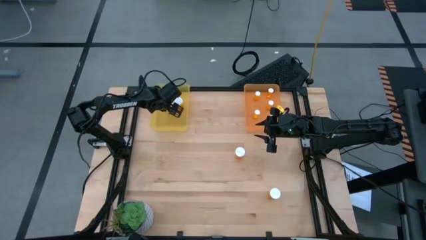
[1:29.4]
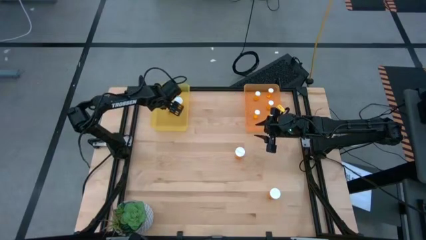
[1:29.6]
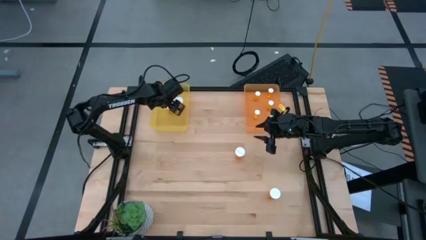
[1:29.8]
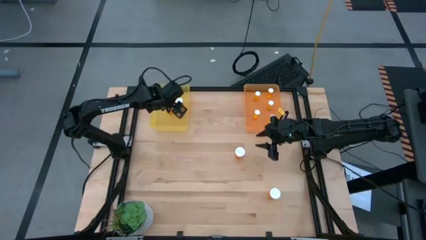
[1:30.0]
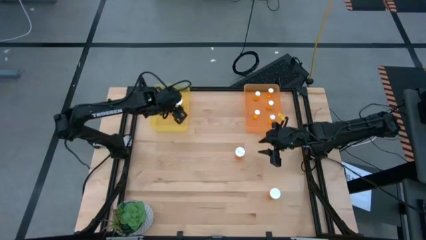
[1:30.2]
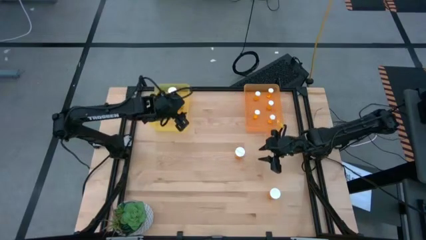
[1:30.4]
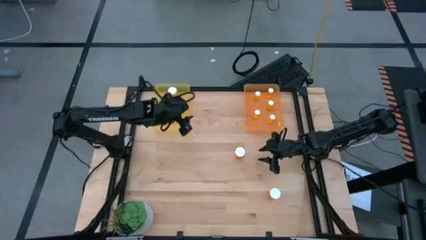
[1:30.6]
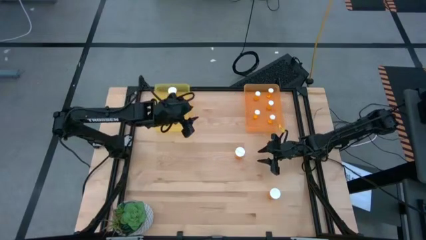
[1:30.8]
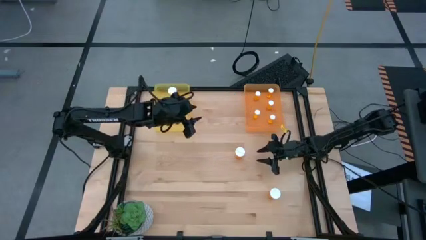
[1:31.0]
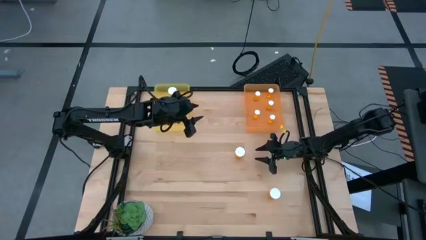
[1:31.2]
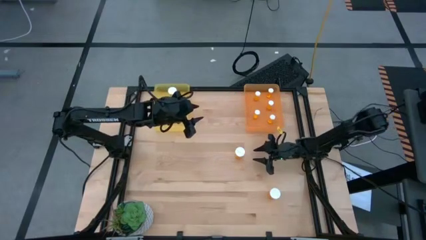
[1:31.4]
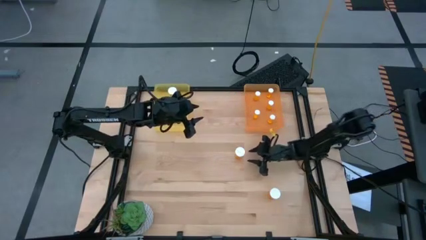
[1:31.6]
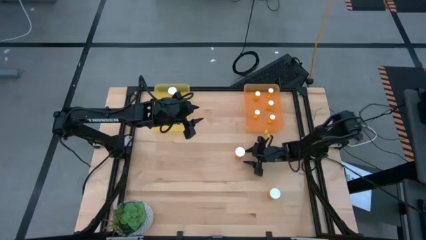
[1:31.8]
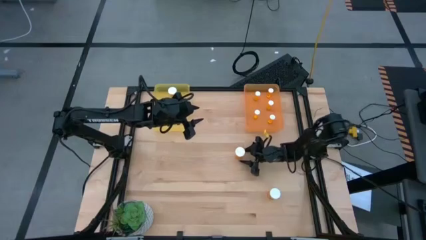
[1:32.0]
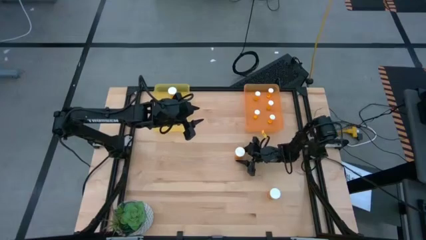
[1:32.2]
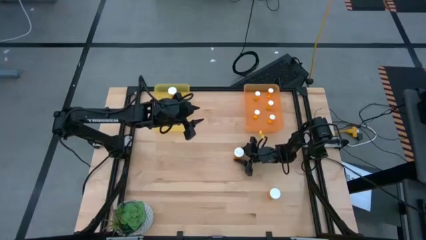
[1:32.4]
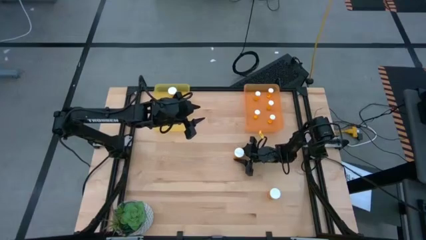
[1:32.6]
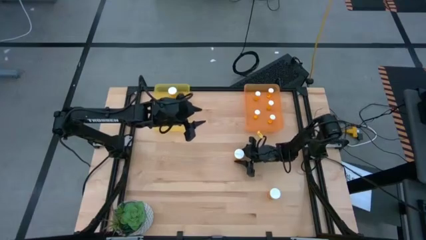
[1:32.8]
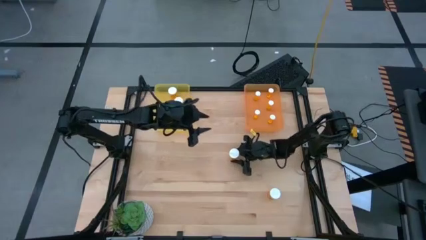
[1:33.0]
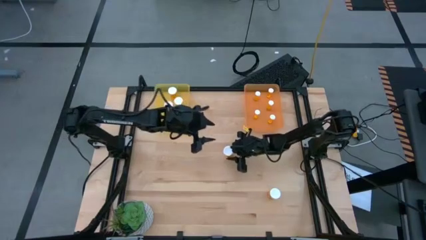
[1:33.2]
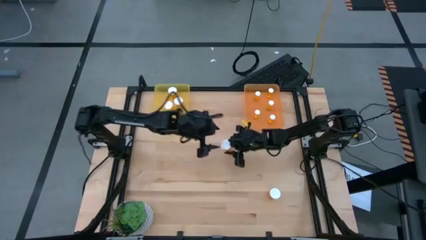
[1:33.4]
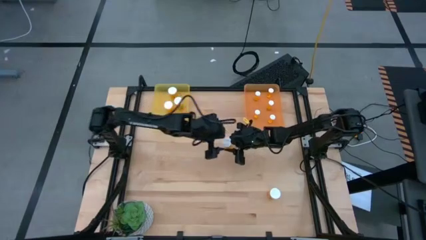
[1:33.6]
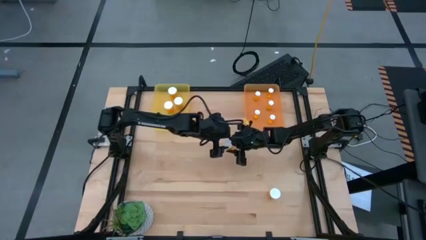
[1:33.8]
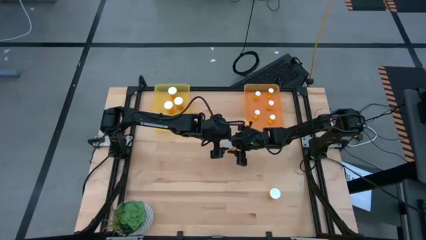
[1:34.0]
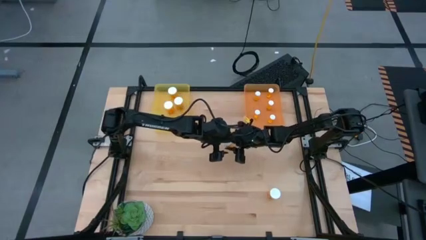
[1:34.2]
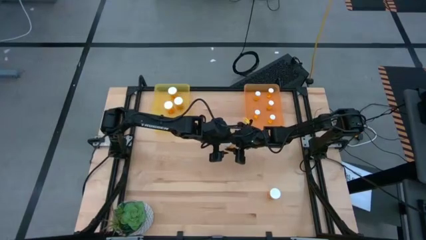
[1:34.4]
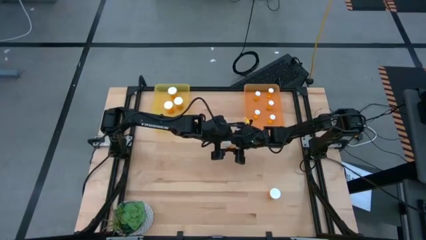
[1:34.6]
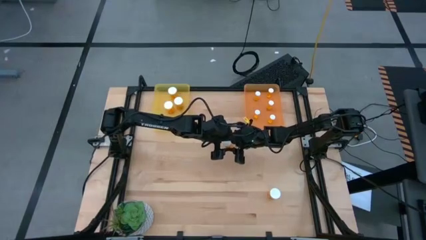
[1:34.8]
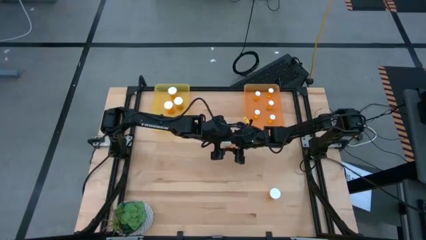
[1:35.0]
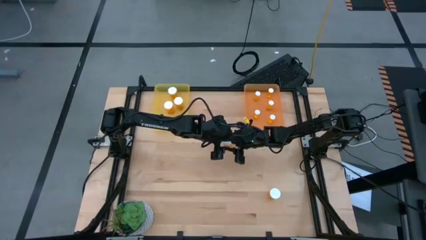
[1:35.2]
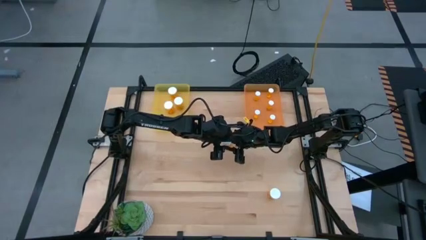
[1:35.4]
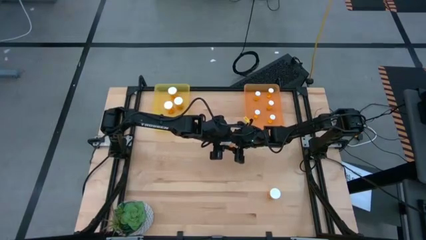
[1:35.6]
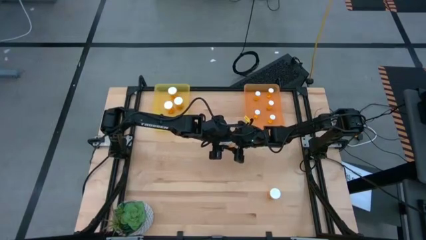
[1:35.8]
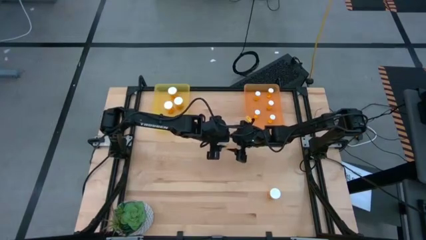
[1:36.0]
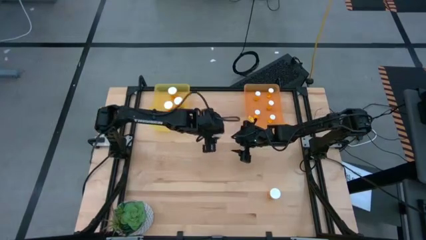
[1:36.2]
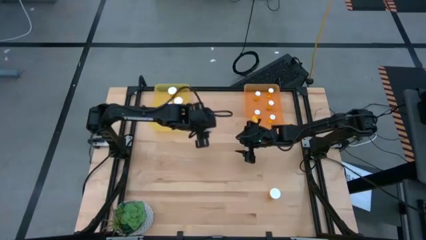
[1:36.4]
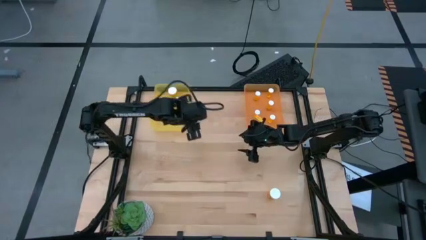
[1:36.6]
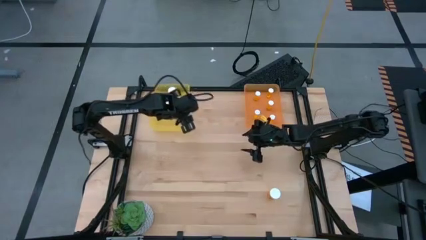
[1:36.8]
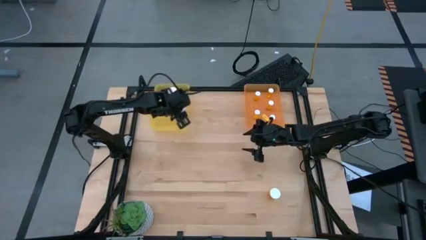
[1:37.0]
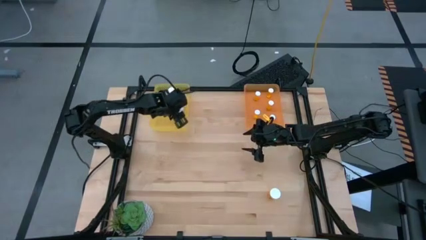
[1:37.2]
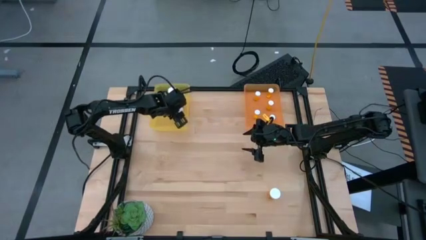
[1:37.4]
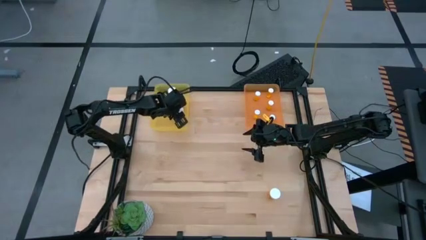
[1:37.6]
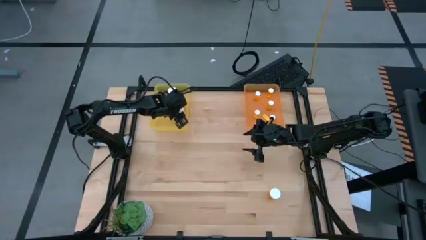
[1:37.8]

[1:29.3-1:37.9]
Task: Pick and place medicine bottles into bin by pill shape (circle, oval)
Put the large orange pill bottle into the yellow bin

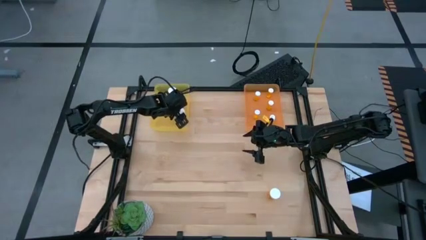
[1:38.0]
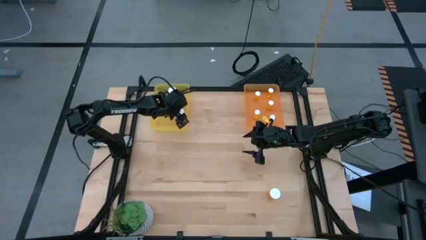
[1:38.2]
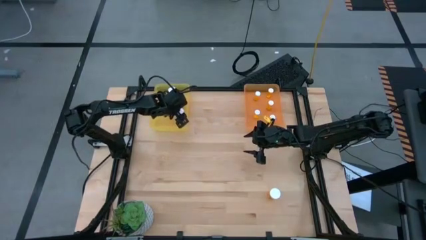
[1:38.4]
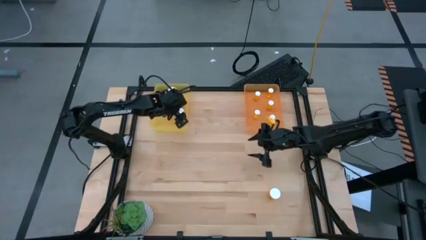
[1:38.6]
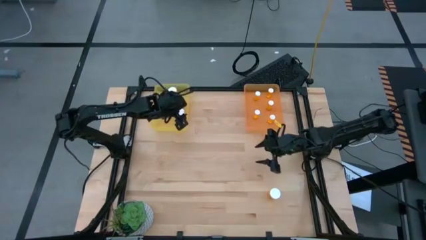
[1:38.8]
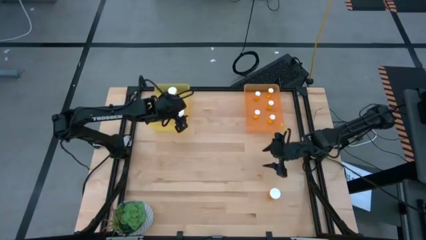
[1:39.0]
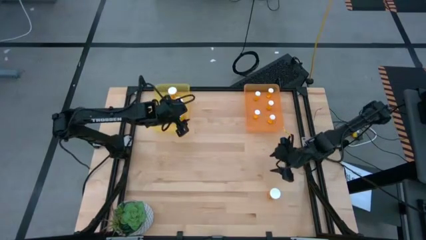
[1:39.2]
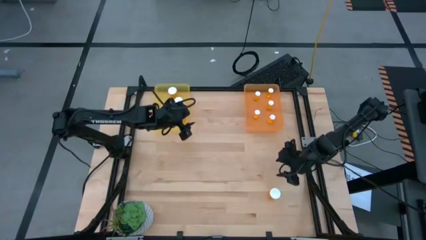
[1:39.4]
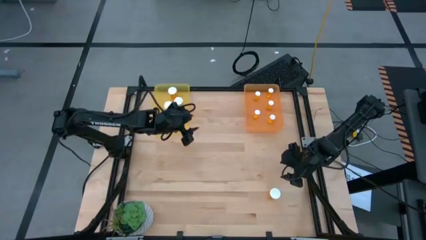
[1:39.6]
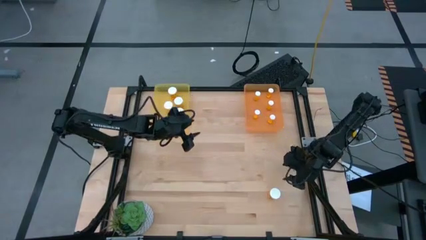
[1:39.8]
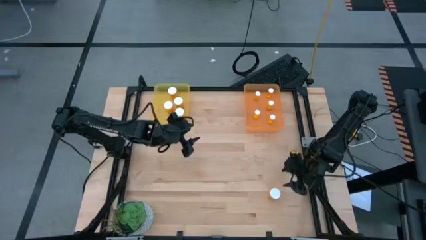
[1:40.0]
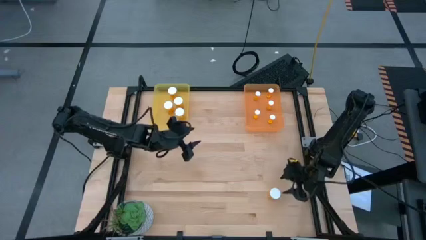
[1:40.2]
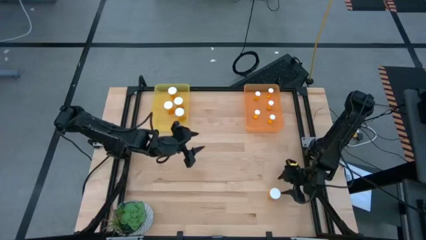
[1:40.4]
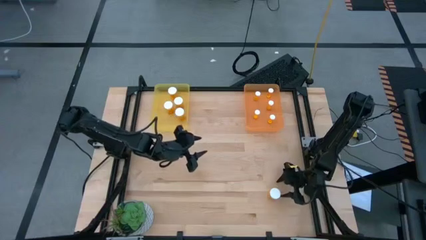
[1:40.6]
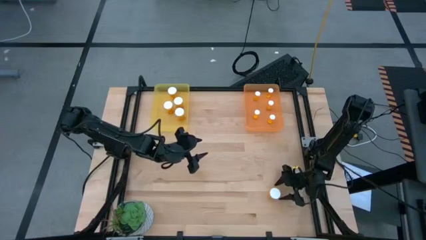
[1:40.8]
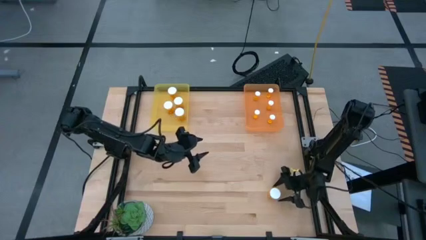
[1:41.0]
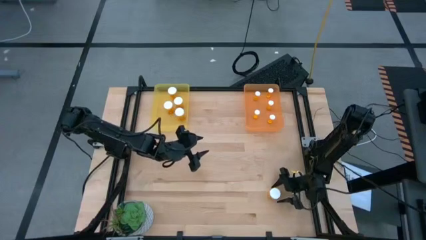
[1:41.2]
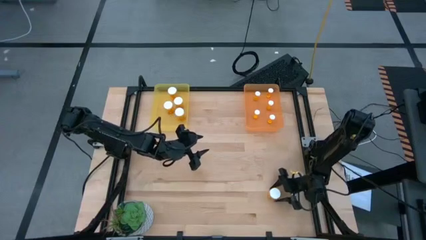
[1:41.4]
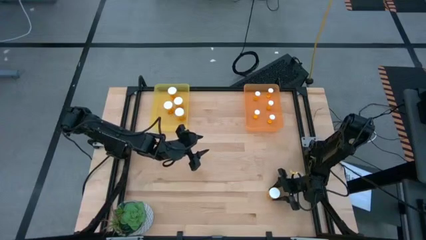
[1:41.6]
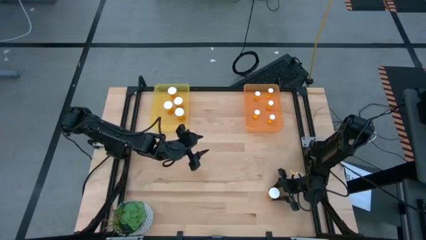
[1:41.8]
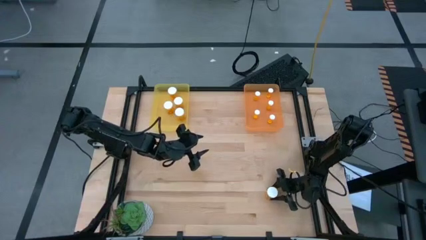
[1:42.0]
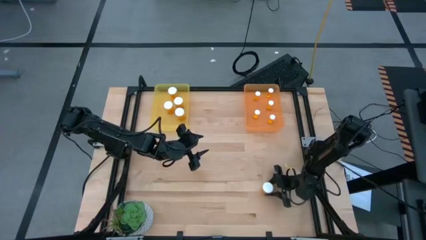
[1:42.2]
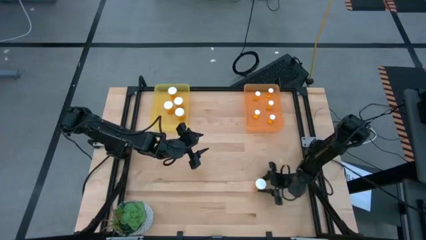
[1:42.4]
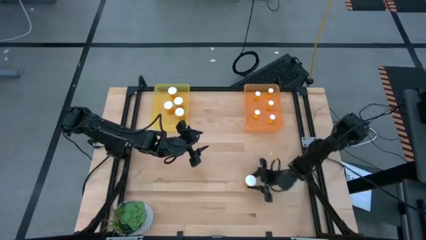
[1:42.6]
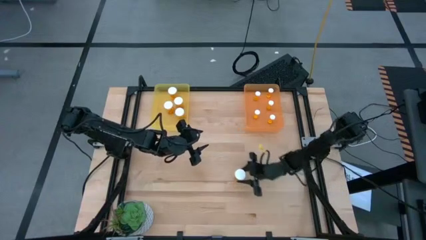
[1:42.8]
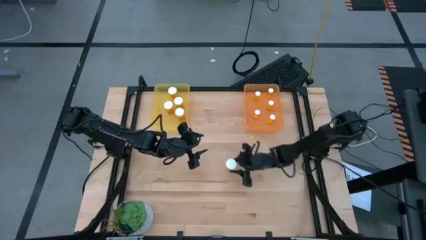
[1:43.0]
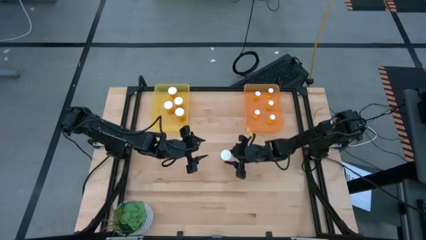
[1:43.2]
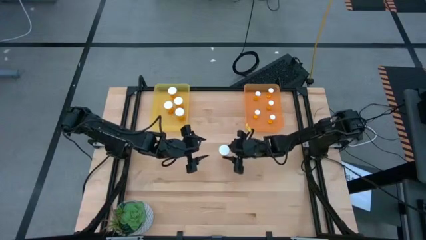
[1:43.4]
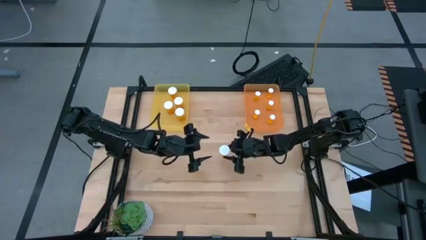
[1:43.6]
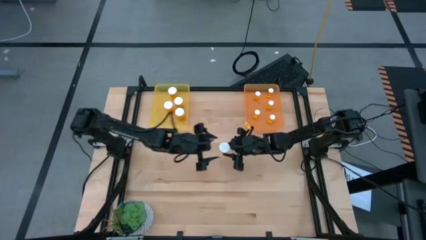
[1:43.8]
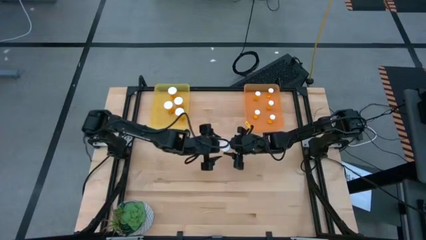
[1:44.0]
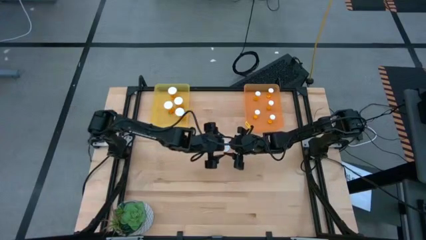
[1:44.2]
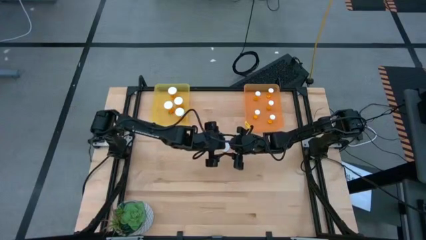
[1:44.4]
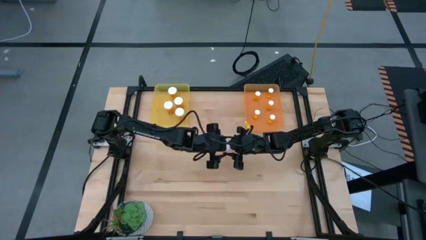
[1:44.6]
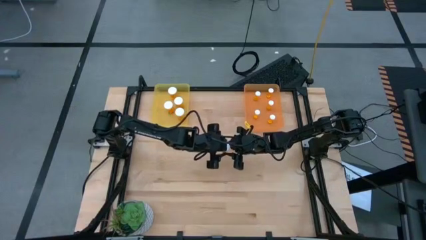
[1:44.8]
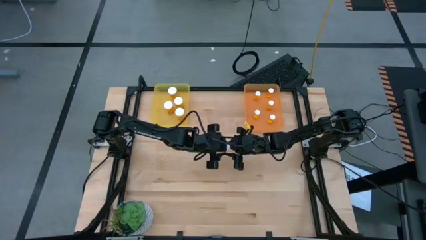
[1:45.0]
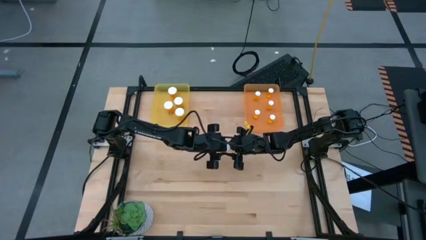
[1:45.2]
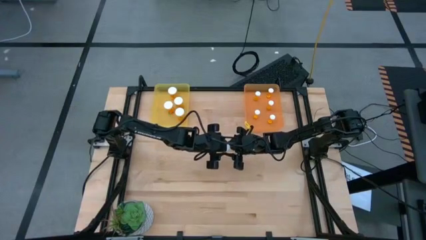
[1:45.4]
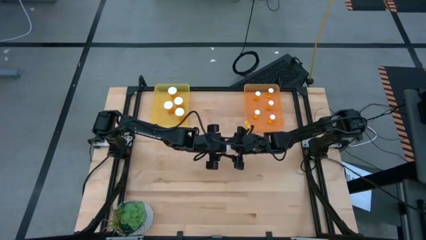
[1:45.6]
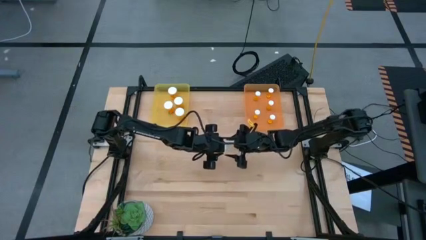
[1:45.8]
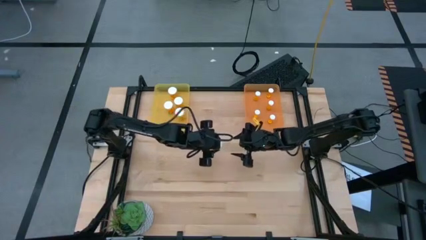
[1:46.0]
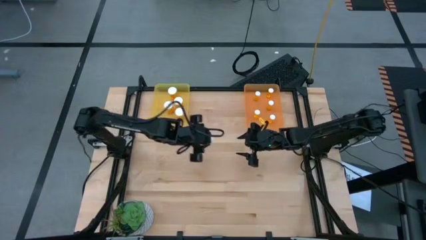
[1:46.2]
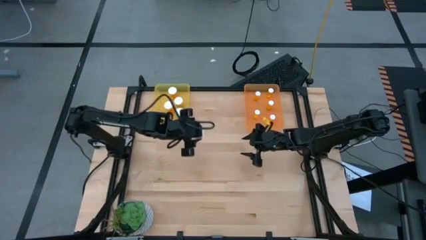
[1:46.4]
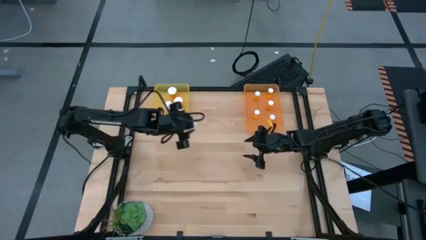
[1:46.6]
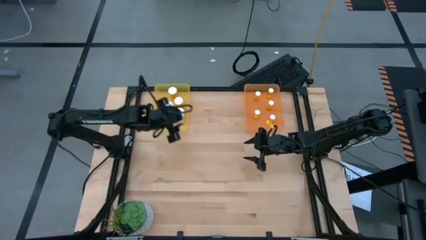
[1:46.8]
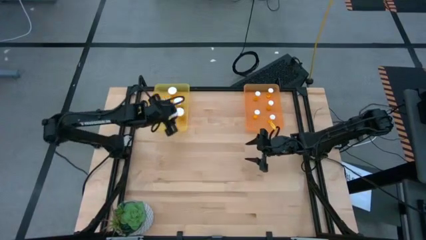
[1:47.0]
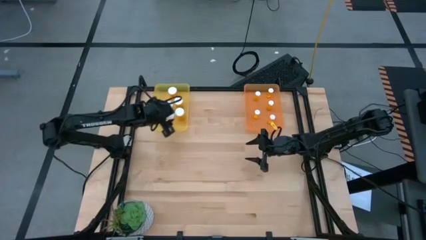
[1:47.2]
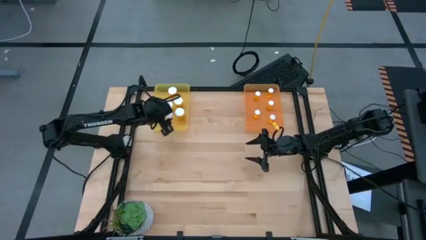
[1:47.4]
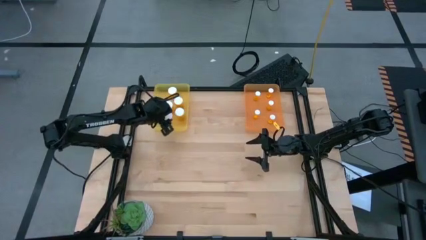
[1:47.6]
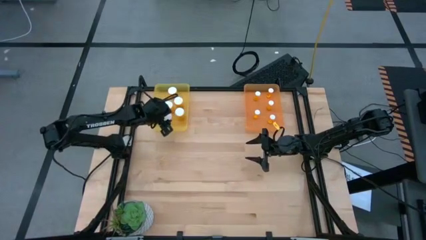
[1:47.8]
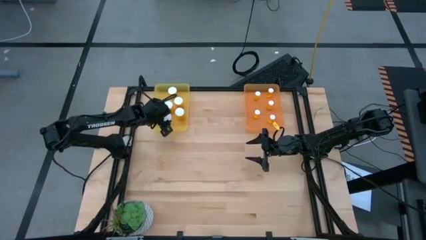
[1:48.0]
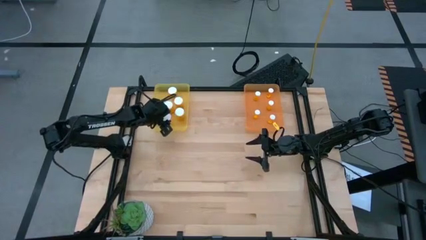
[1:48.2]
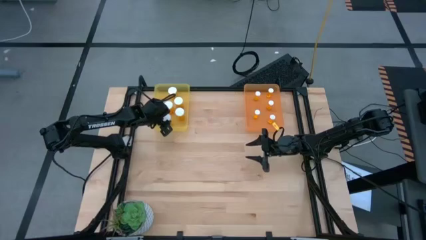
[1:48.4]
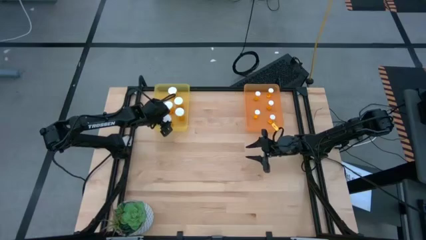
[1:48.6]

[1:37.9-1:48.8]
Put the large orange pill bottle into the yellow bin
